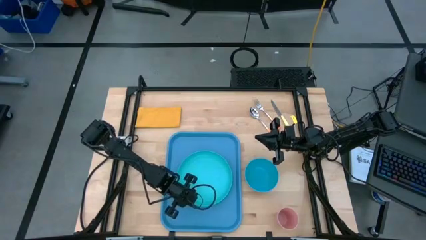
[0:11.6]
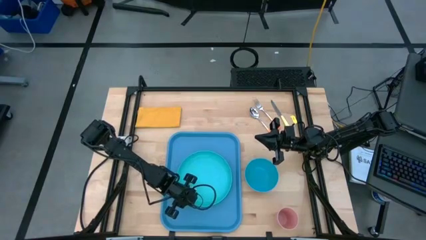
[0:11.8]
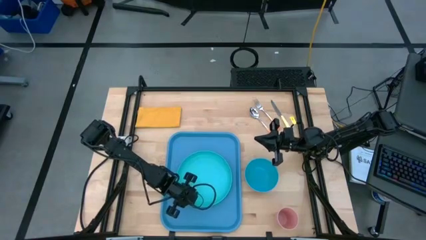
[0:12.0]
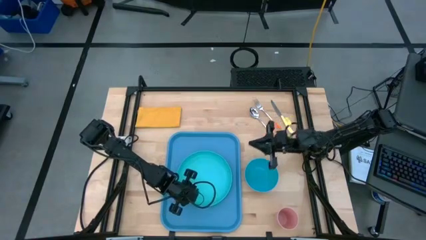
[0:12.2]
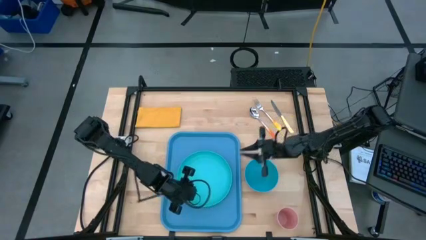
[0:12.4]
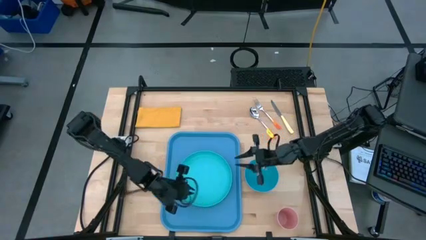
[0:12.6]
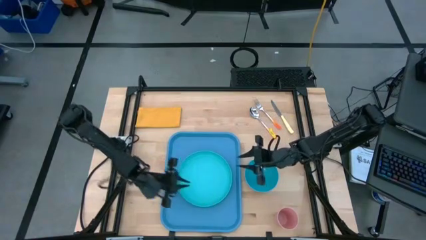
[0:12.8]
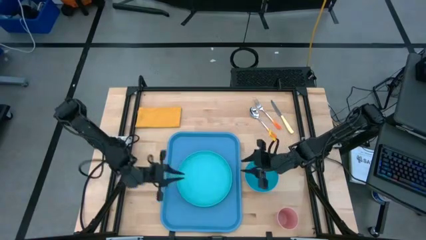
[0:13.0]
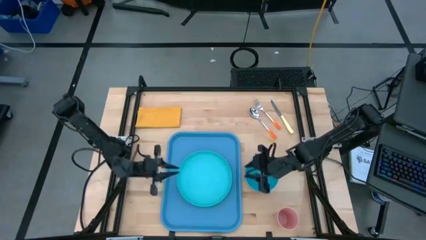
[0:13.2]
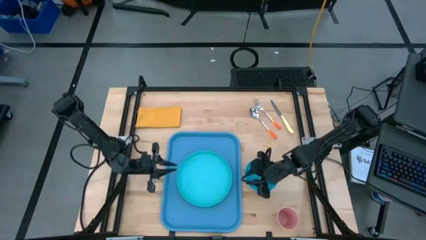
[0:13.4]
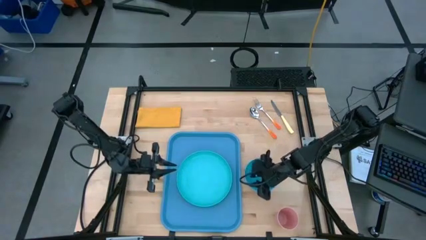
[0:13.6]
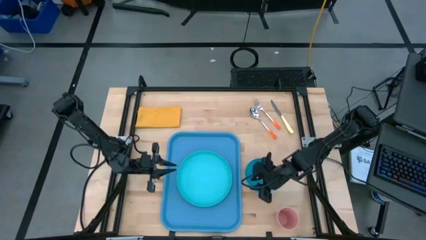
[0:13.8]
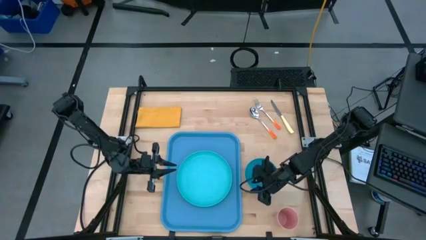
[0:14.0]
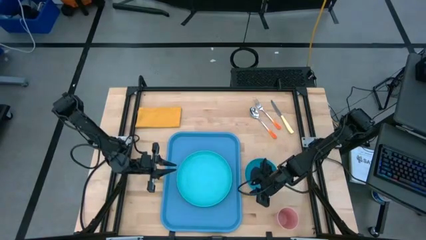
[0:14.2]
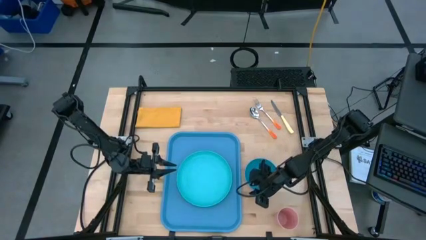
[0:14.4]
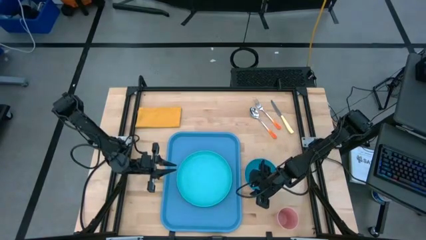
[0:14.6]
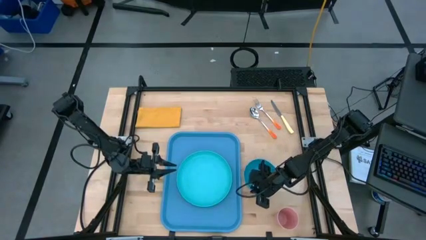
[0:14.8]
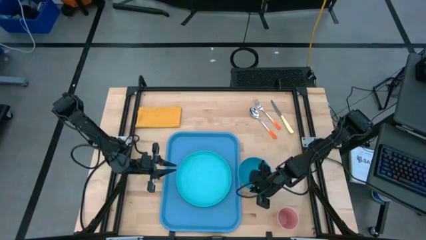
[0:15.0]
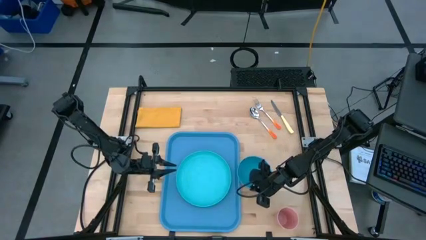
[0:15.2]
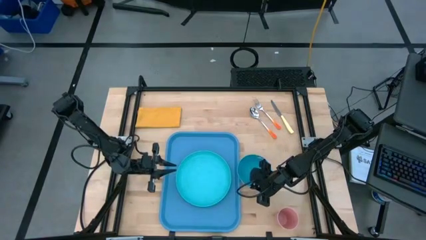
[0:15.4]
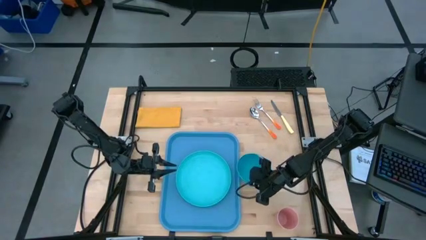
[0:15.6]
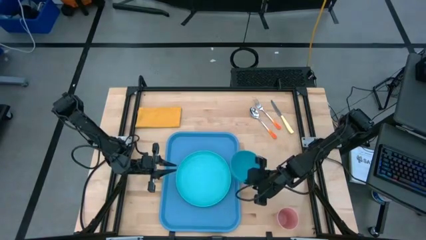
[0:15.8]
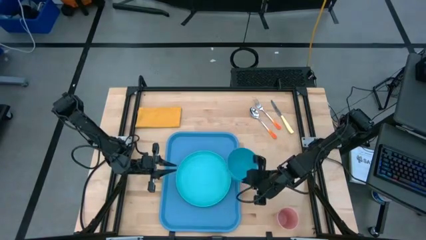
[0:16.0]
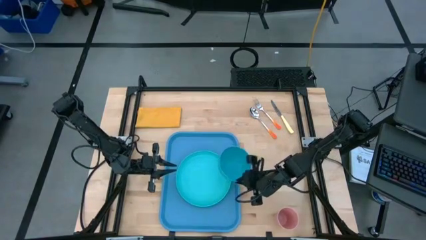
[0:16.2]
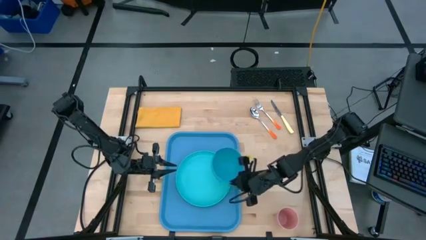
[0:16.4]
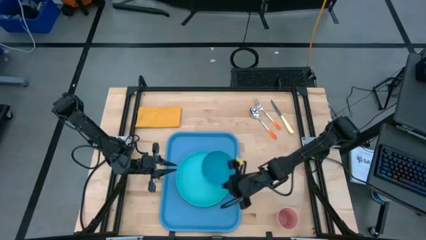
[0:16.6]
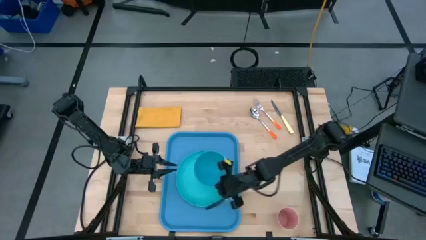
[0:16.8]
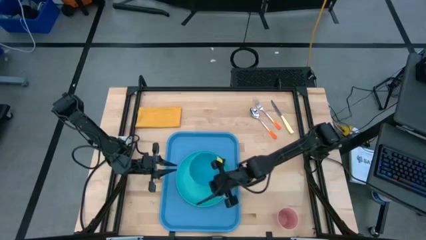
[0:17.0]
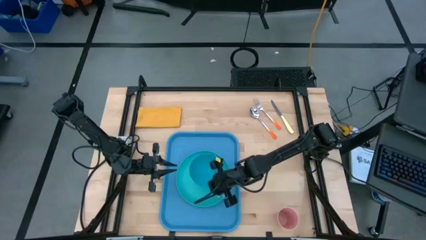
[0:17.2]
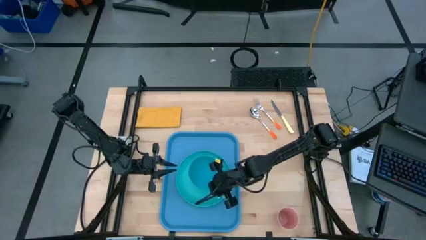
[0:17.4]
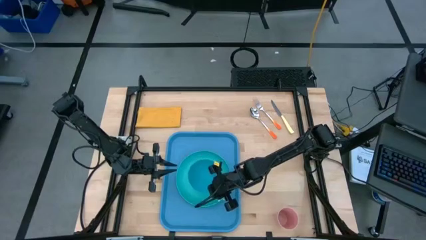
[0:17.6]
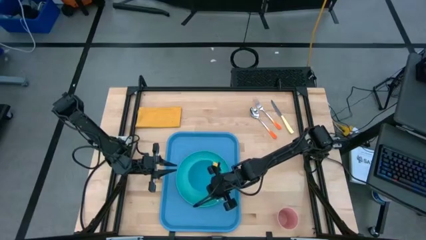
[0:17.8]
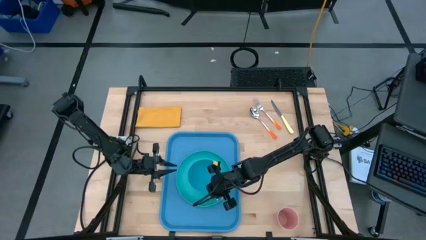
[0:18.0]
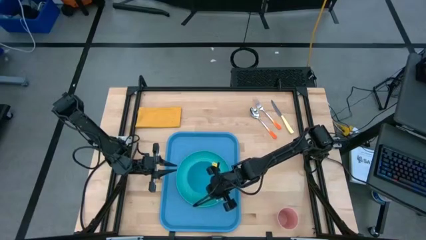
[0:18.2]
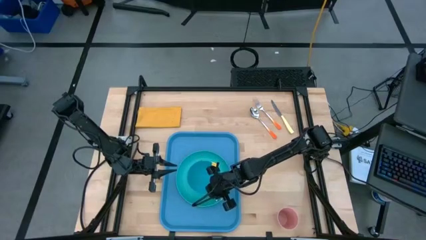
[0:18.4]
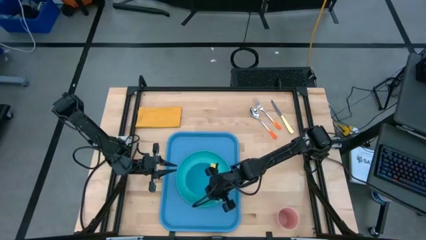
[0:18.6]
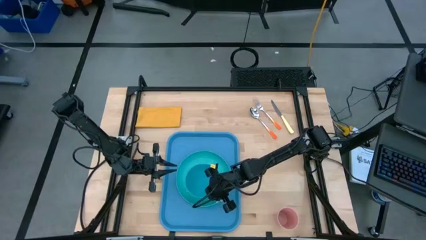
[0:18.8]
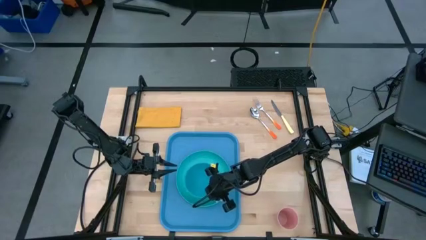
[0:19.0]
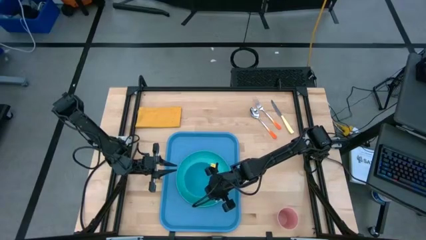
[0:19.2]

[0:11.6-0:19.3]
Task: Set up tray
Put the blue bowl on top of the light blue plate

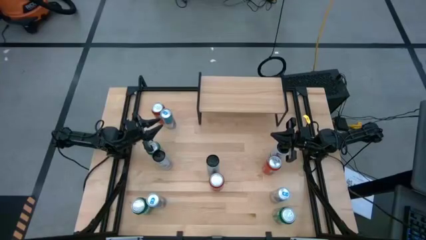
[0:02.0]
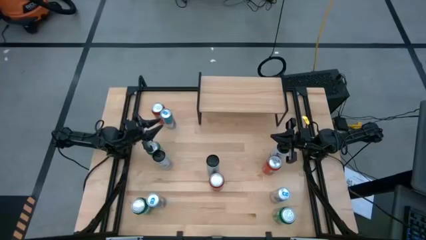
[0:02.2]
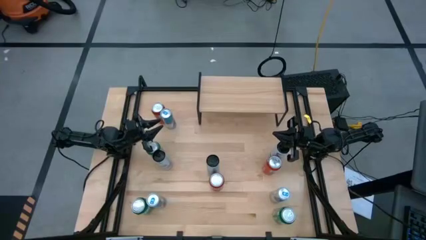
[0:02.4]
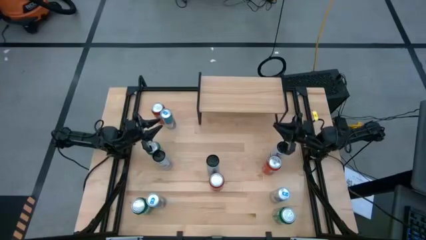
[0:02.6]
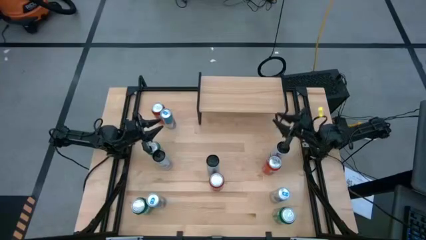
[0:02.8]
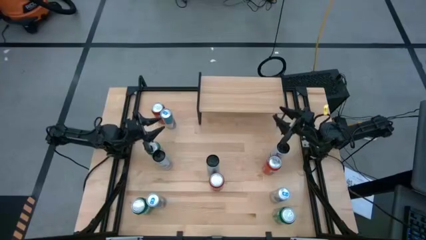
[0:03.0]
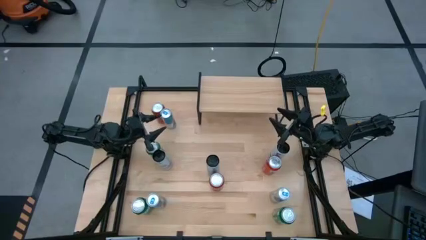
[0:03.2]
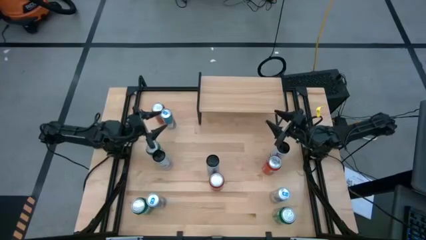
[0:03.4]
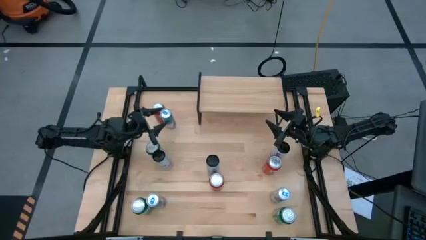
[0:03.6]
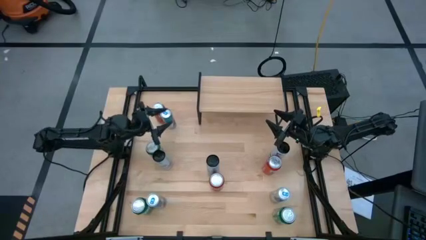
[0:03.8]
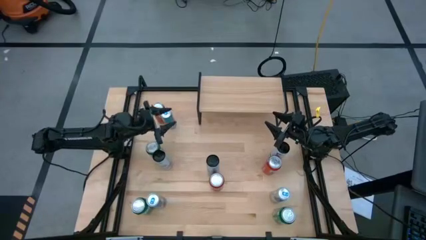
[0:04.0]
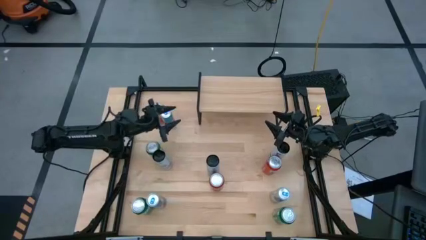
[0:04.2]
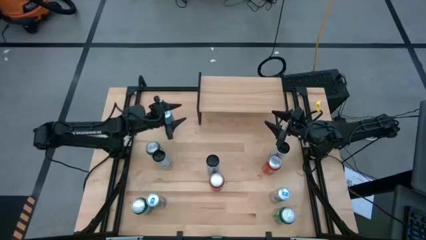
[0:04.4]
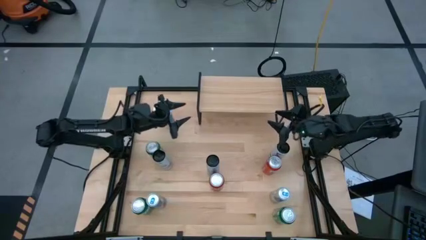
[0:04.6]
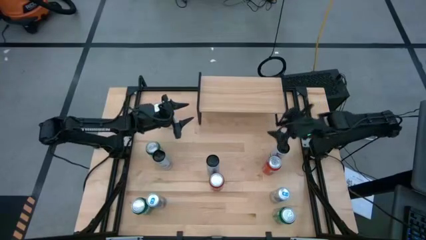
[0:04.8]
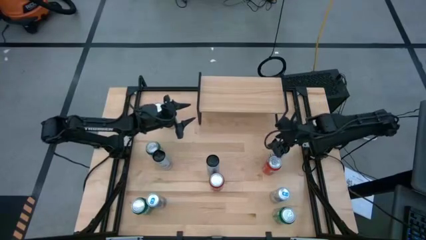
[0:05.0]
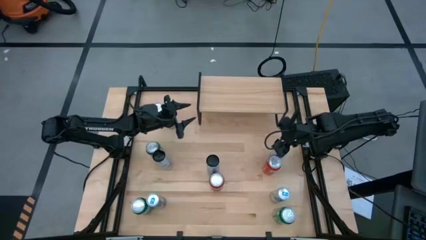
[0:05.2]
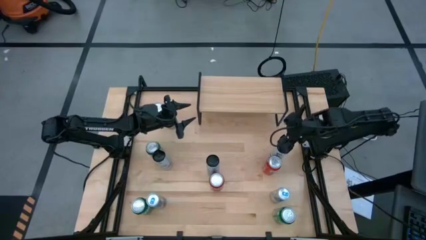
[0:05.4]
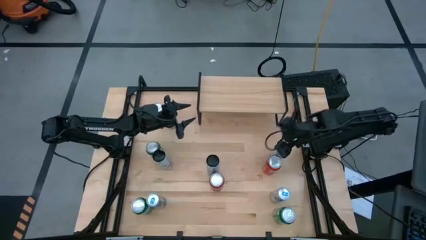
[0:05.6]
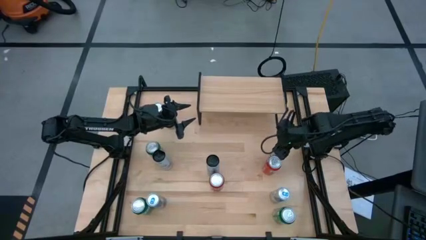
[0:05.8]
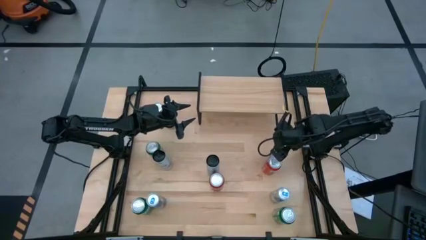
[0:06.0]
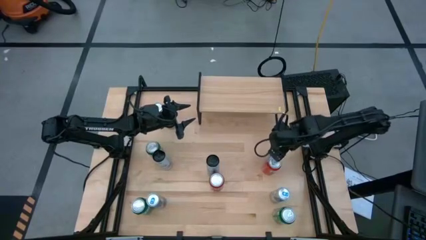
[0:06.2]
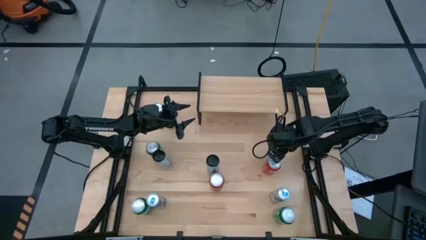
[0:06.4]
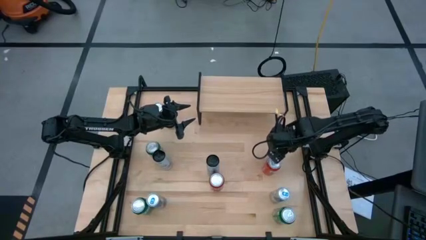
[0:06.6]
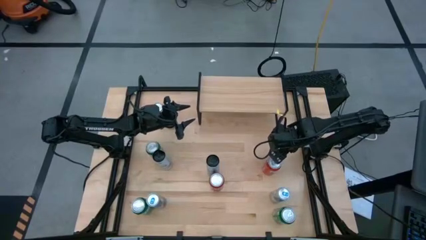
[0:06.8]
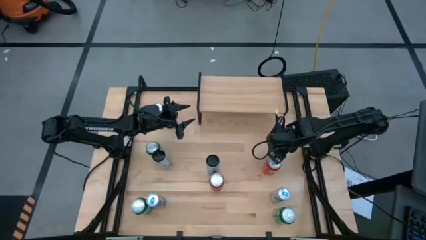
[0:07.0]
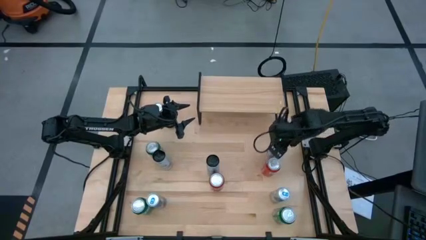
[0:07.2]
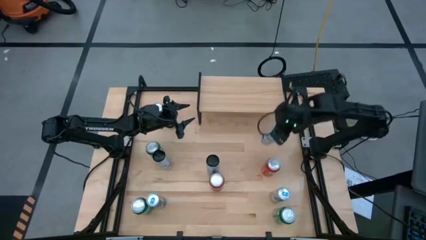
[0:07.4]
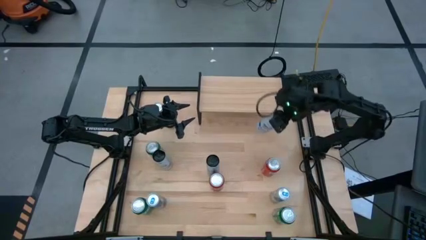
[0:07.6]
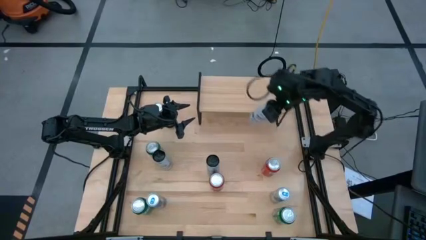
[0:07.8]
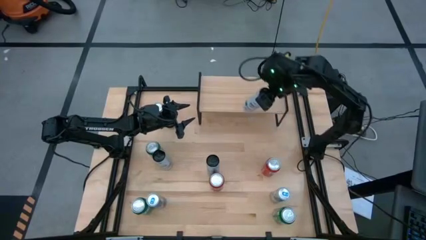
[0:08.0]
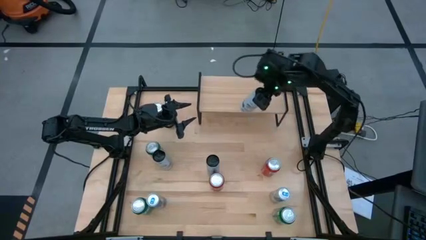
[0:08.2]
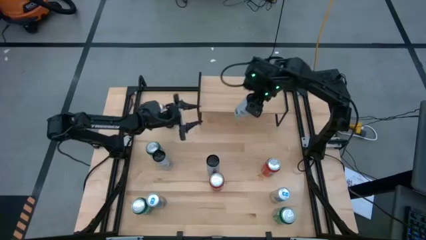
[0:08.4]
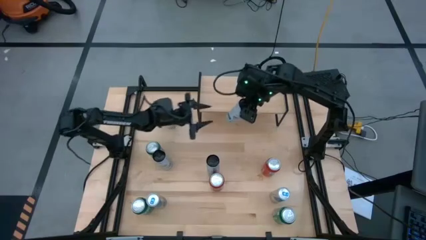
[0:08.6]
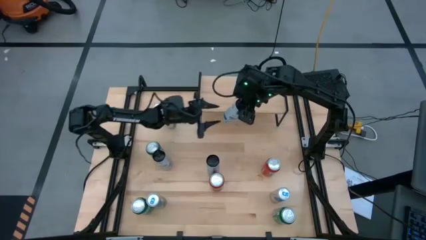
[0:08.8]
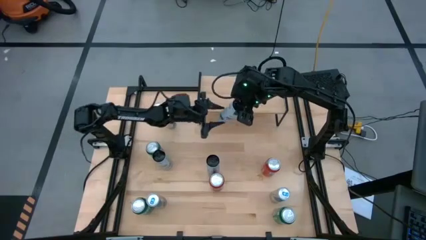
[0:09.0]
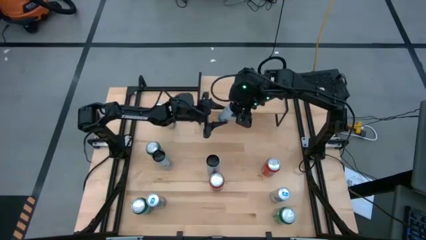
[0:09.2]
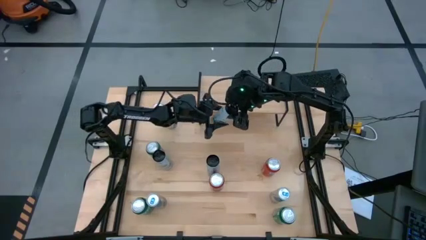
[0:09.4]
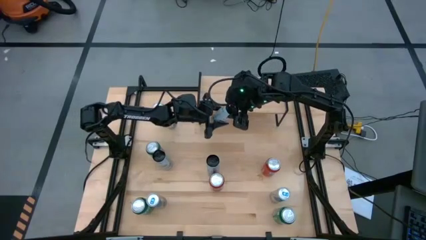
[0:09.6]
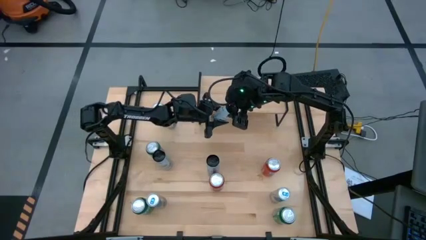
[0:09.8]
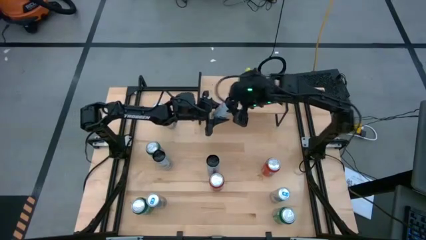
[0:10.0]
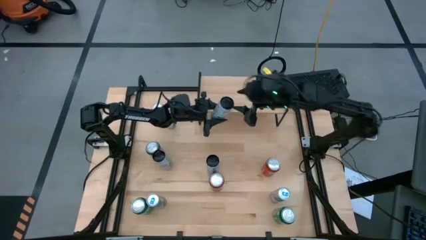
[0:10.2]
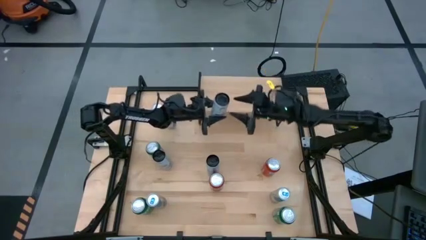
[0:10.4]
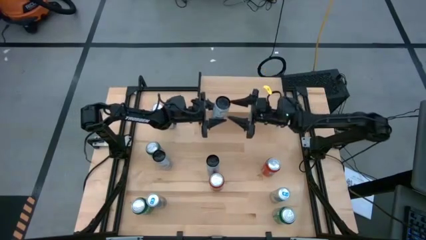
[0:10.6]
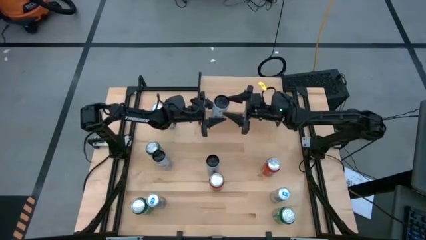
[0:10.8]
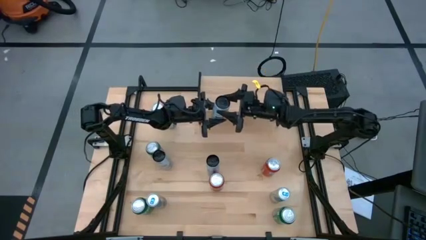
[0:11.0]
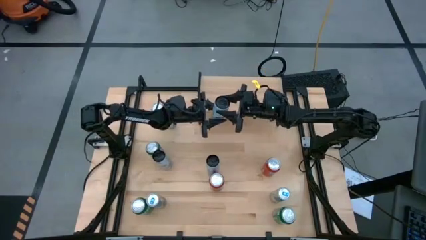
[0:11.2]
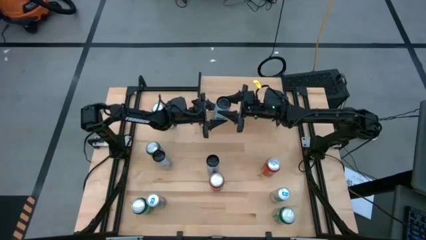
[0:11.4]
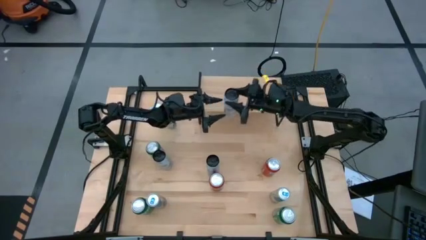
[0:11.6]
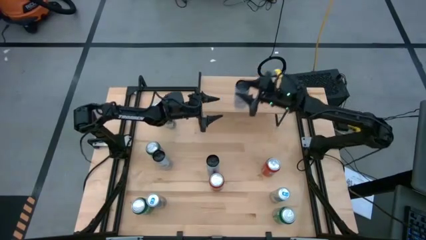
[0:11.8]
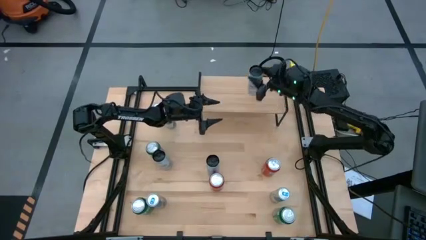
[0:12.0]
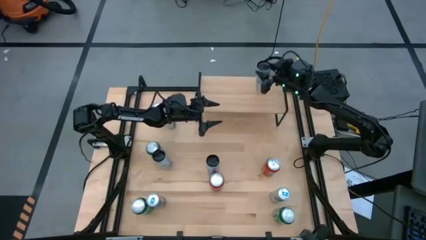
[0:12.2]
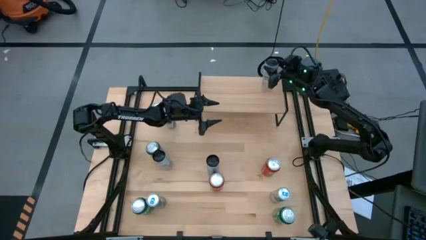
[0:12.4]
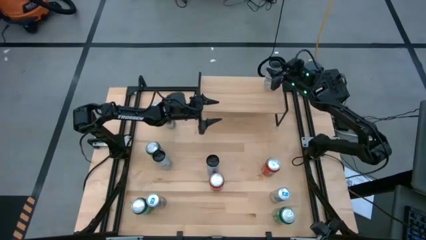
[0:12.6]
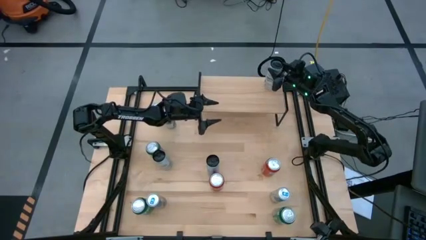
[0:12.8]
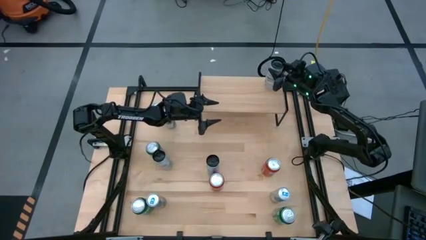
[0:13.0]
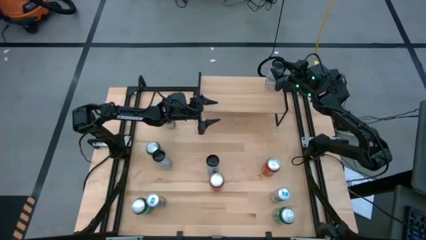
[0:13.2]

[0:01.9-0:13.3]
Task: Place canned beverage on shelf
Put the right white-blue soda can on the shelf
